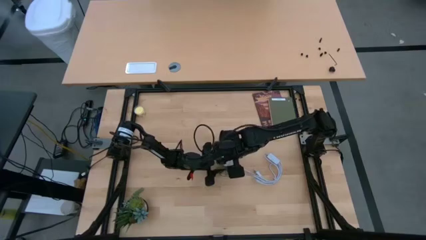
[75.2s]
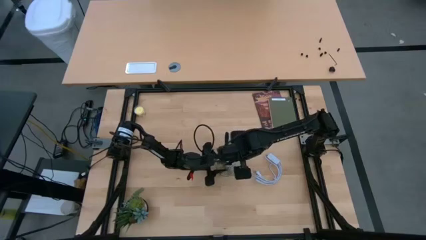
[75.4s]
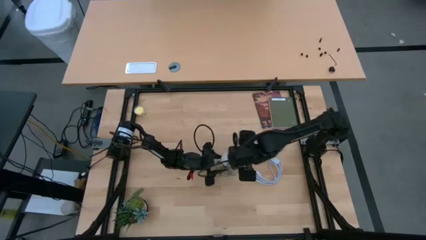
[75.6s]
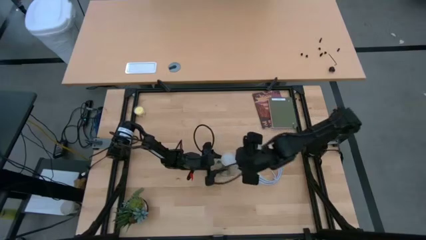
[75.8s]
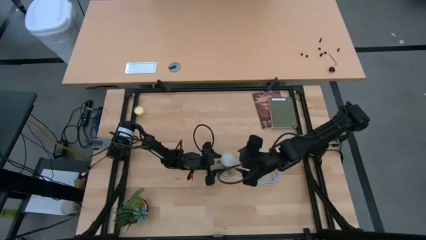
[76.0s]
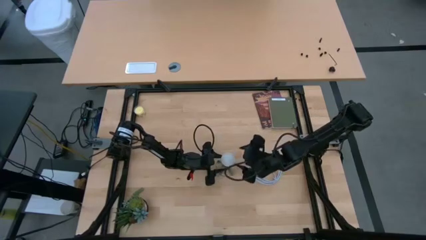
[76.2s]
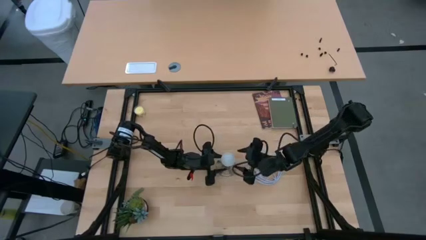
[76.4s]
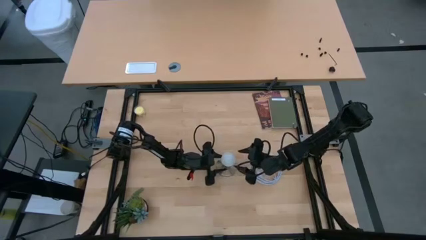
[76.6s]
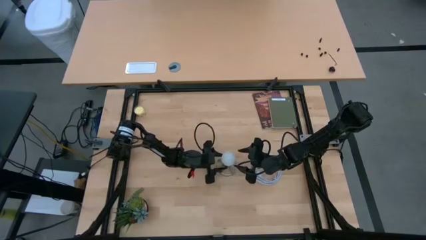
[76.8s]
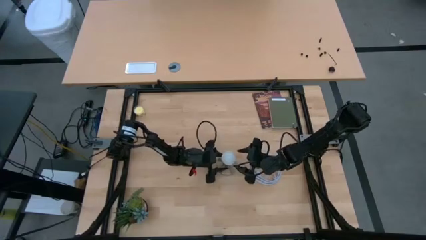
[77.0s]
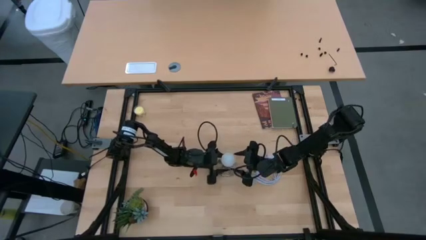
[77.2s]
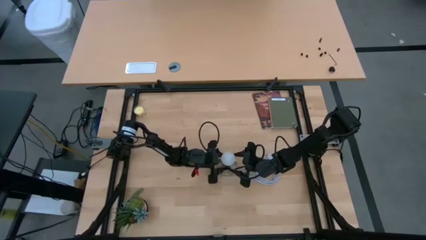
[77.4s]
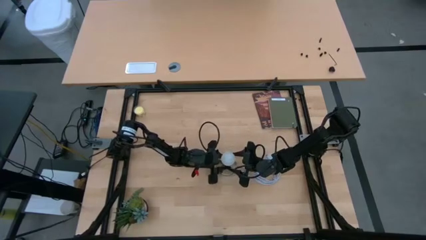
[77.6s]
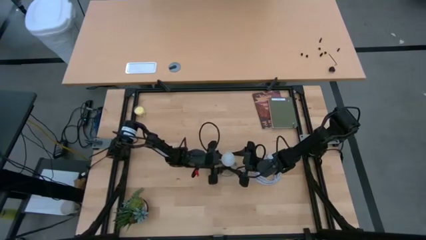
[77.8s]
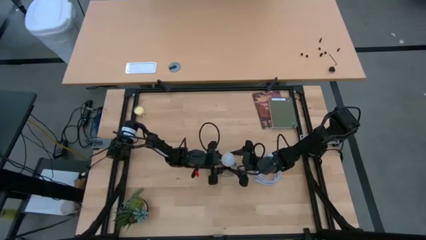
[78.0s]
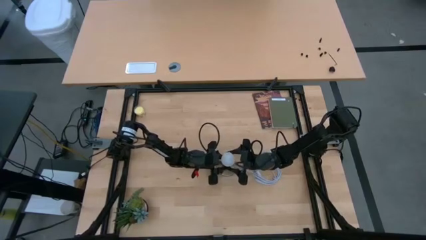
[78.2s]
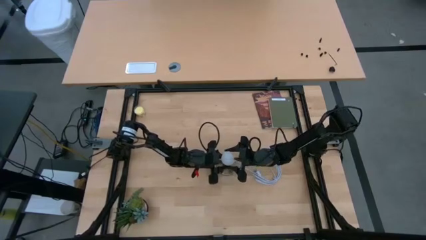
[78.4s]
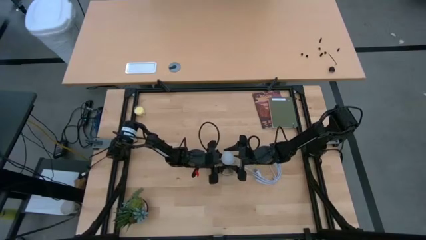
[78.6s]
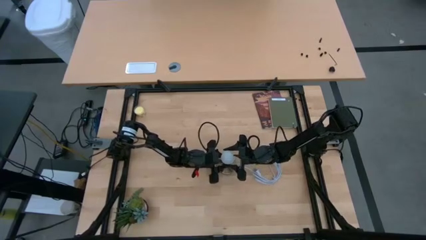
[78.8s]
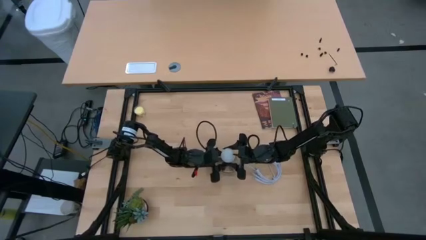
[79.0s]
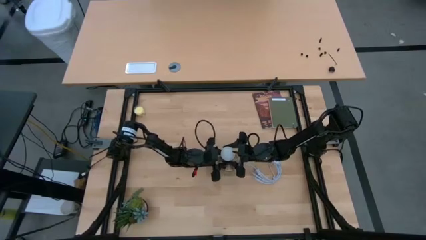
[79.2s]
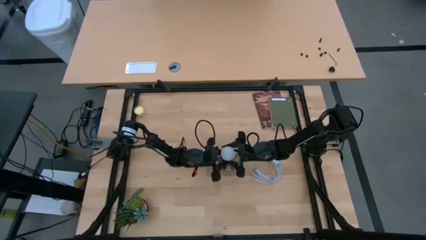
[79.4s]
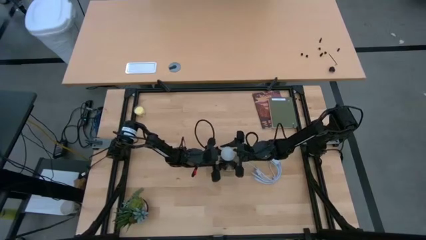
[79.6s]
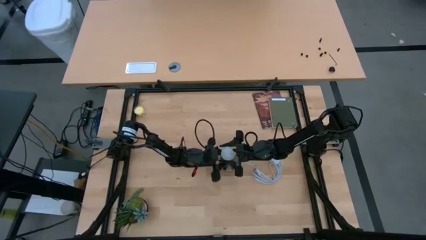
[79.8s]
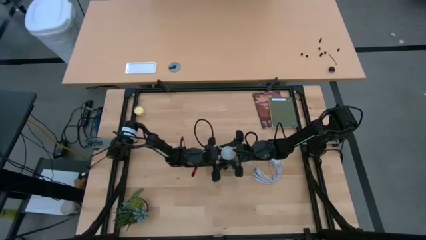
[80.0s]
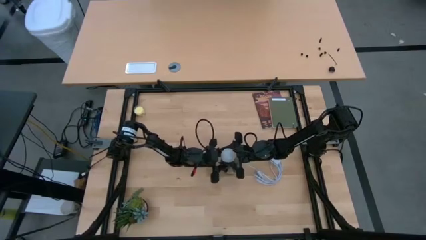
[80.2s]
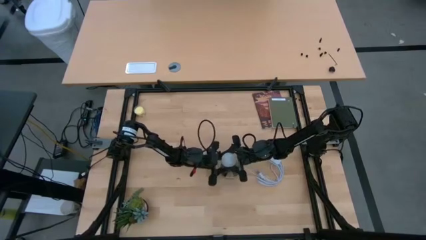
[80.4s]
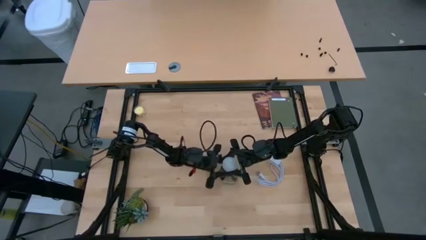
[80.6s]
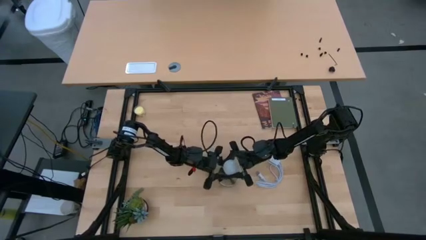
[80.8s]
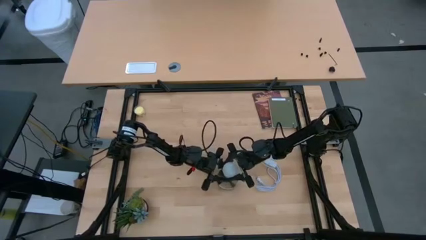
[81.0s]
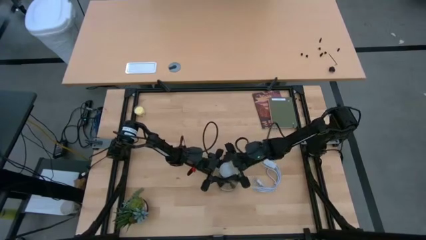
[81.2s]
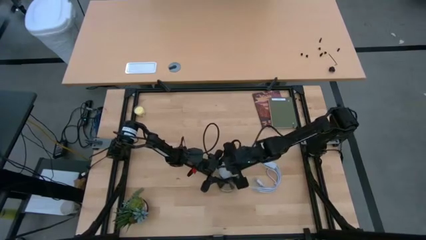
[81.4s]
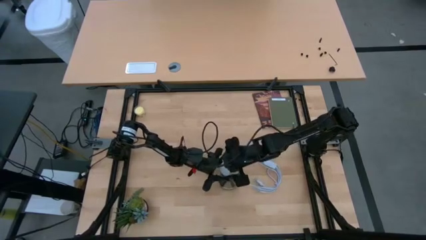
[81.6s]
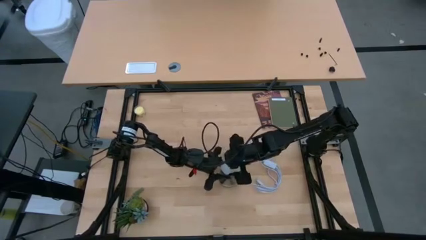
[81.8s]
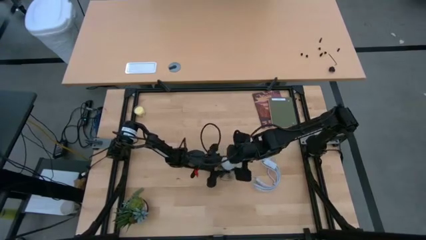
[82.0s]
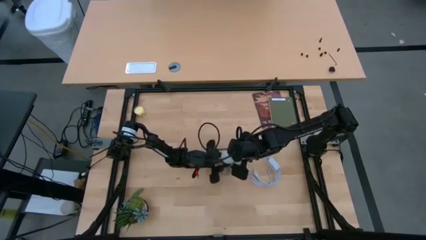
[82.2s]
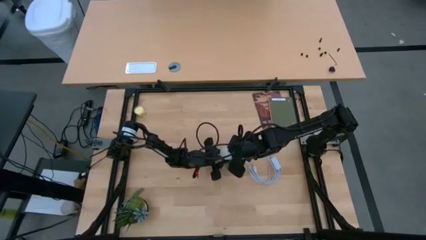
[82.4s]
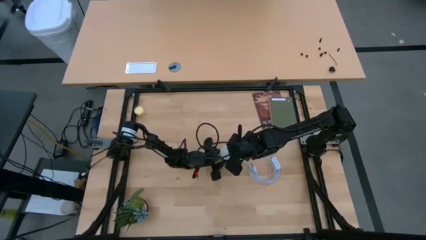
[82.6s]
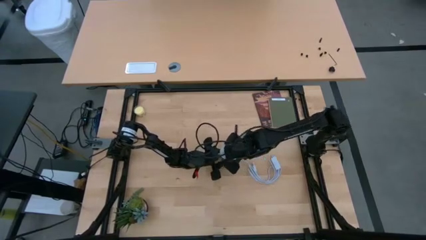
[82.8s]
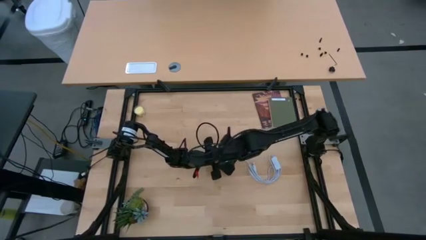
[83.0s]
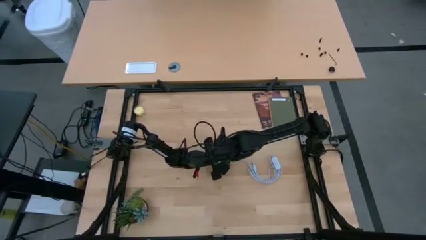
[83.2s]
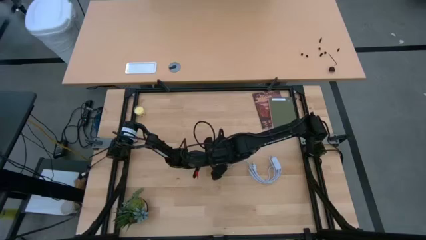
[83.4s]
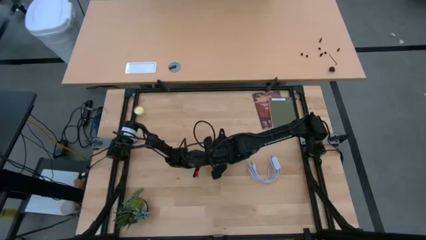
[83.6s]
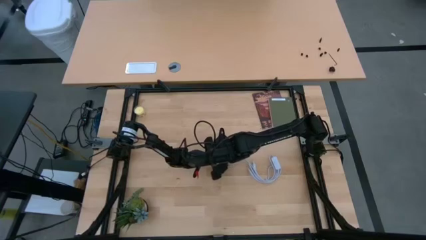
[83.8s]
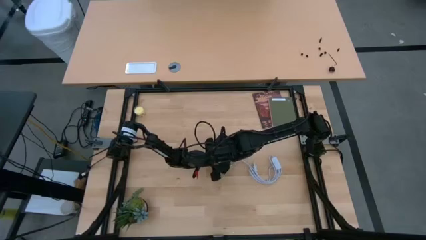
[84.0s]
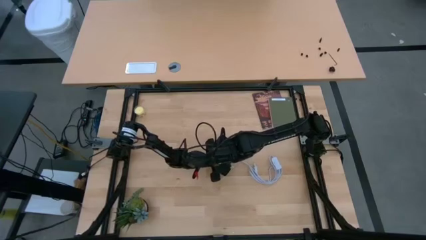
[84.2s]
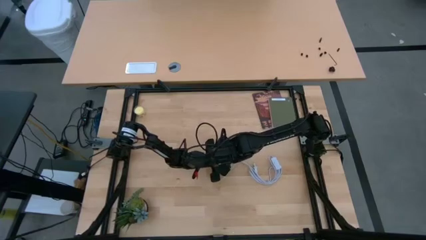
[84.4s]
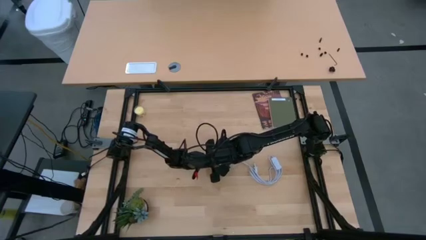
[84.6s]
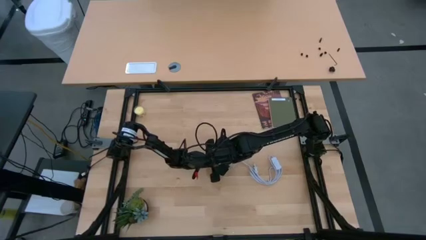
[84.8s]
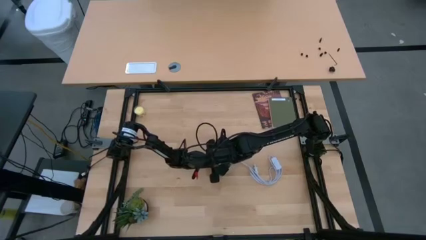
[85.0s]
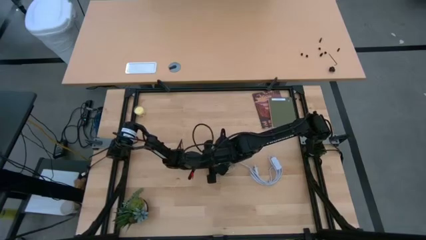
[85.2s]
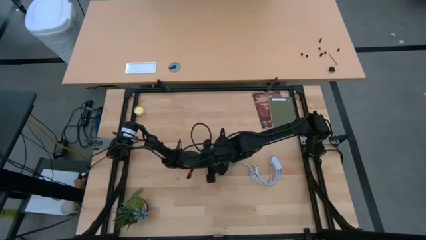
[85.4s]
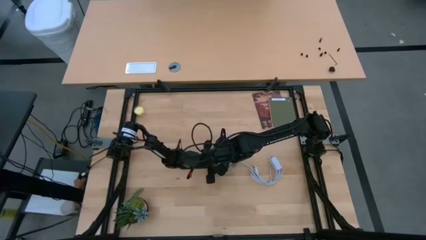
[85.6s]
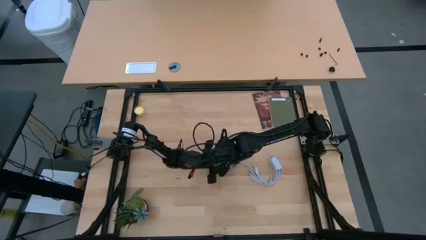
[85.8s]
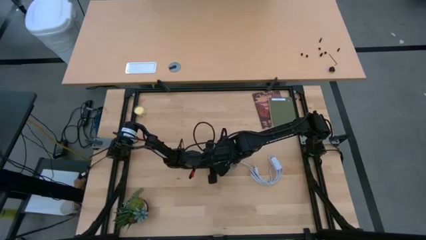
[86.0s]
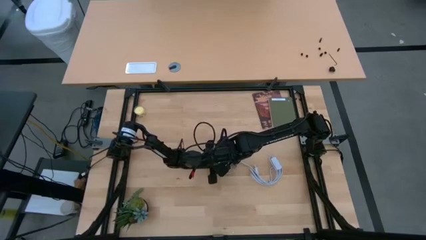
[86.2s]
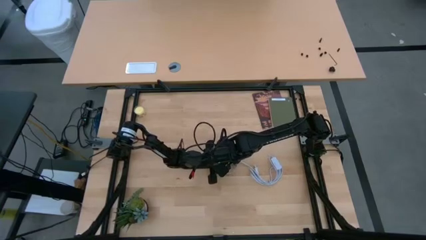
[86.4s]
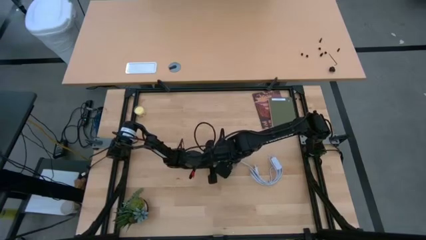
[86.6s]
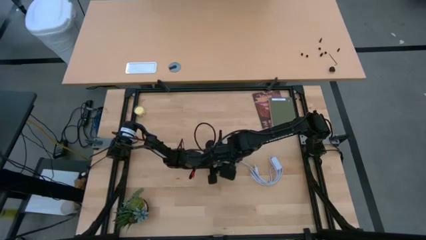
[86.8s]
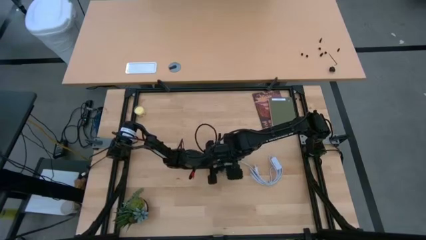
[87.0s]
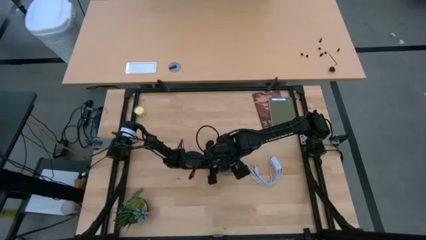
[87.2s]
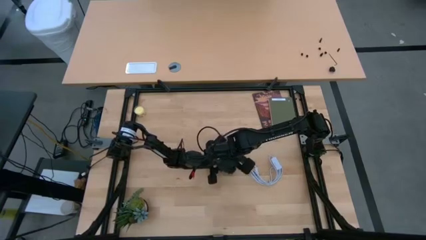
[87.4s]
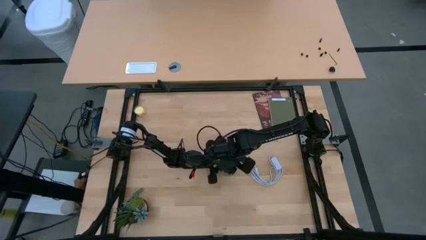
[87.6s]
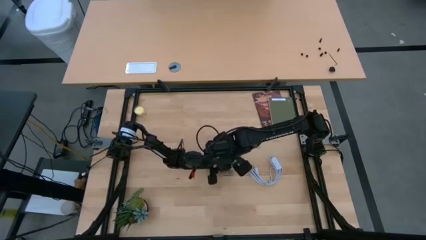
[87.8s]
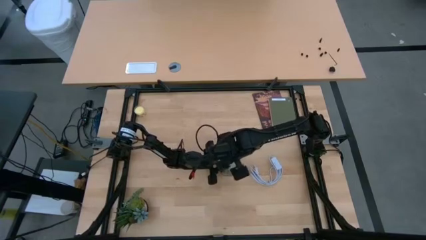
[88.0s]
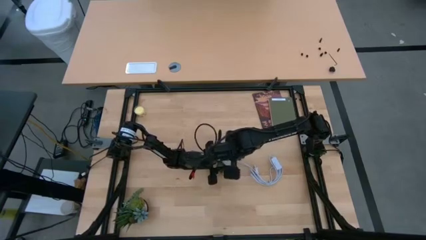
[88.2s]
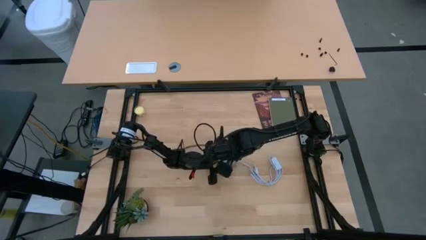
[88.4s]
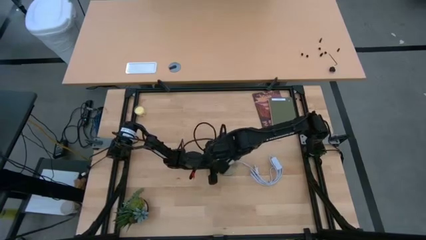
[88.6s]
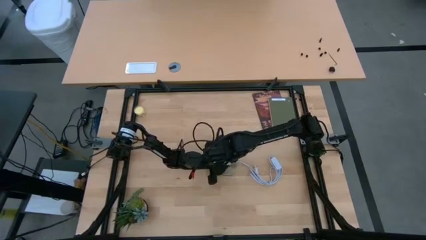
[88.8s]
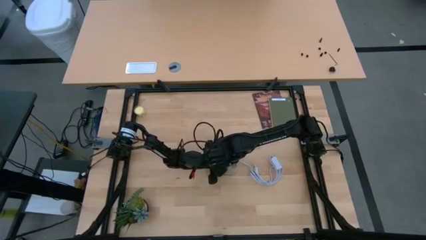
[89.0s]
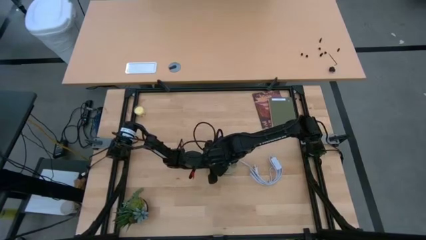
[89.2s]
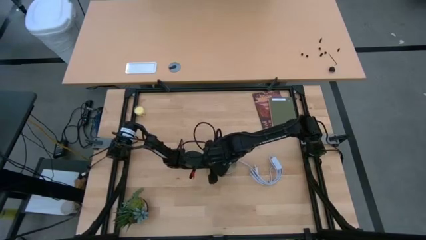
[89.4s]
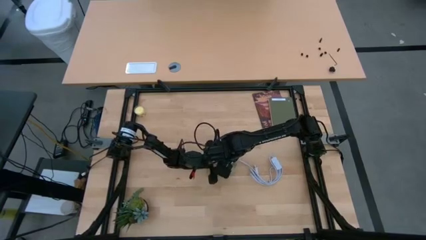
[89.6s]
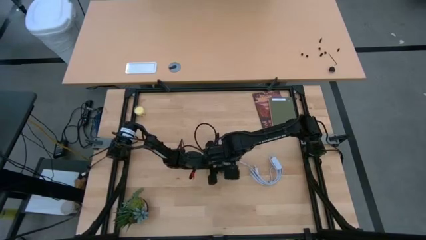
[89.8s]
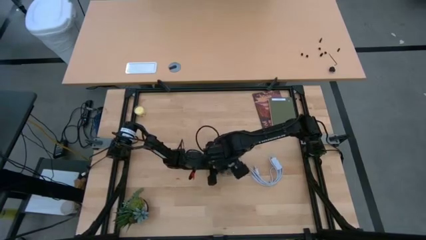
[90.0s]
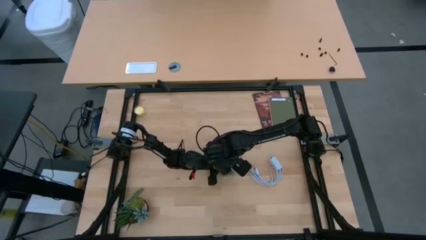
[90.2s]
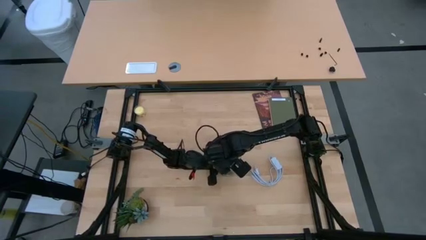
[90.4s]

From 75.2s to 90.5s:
Task: Screw lightbulb
Remove the light bulb from the lamp
